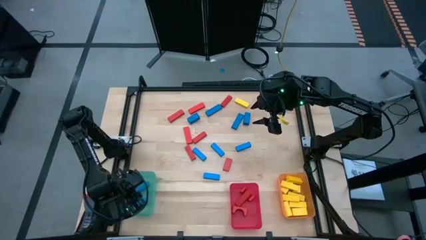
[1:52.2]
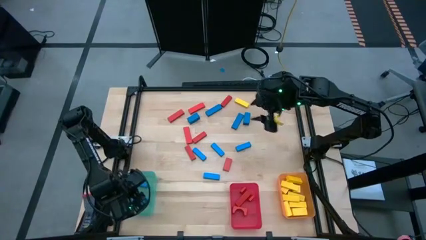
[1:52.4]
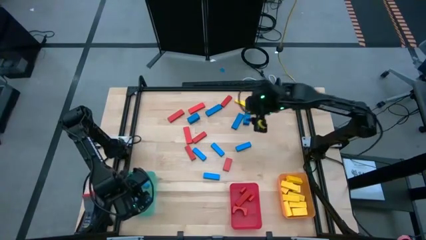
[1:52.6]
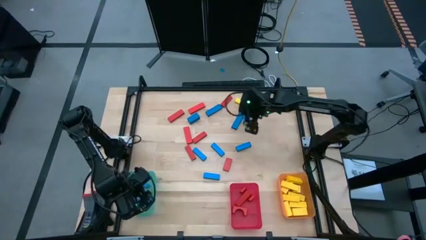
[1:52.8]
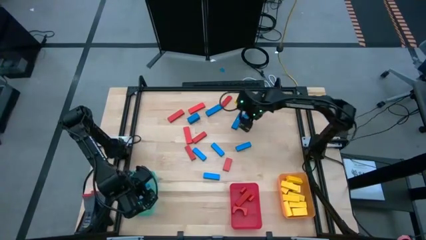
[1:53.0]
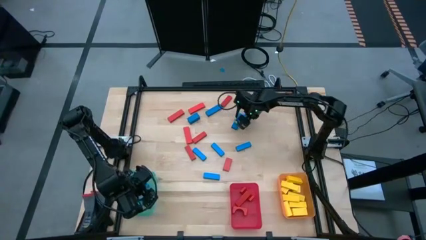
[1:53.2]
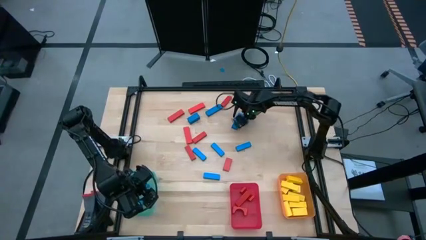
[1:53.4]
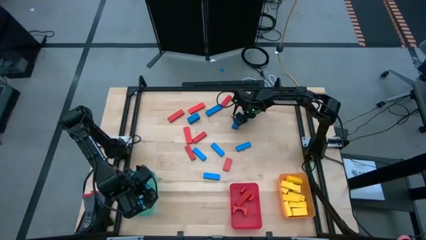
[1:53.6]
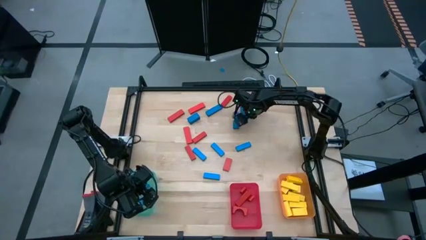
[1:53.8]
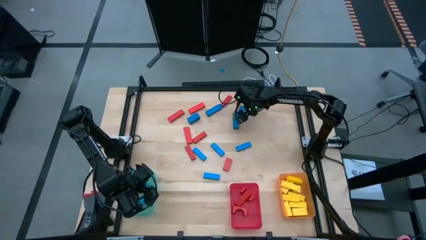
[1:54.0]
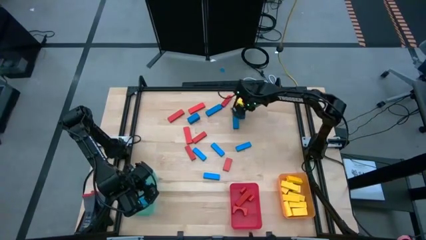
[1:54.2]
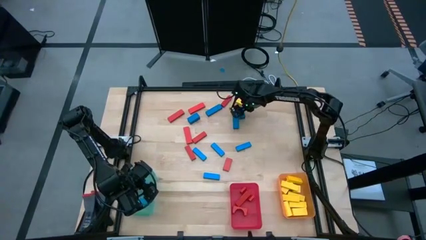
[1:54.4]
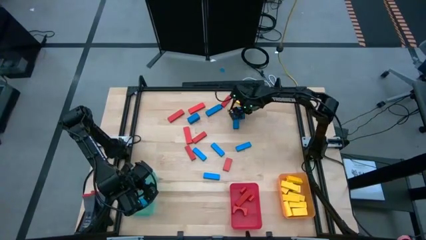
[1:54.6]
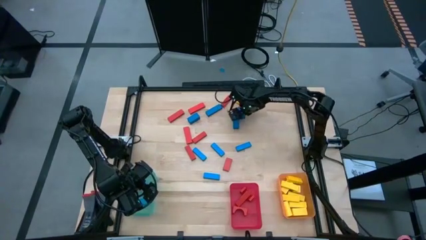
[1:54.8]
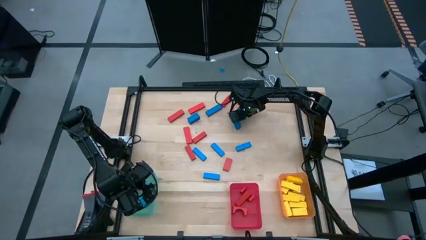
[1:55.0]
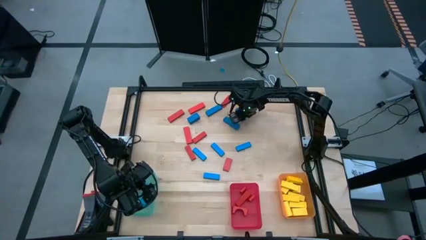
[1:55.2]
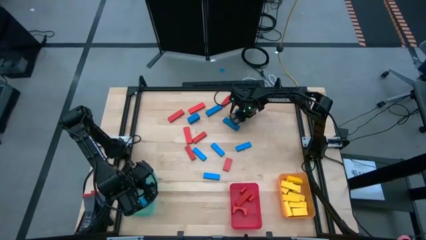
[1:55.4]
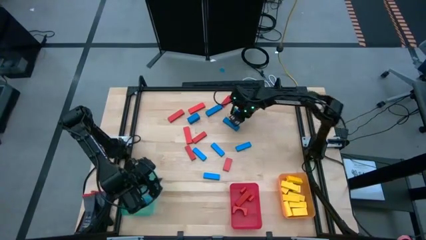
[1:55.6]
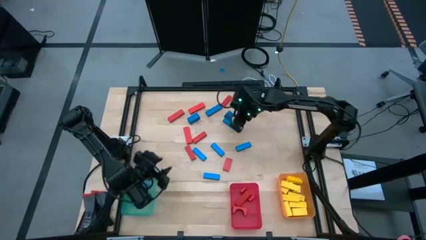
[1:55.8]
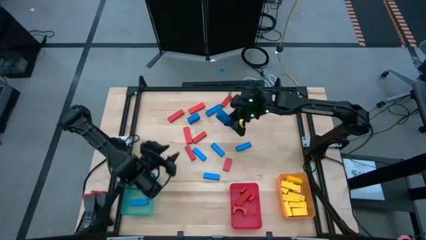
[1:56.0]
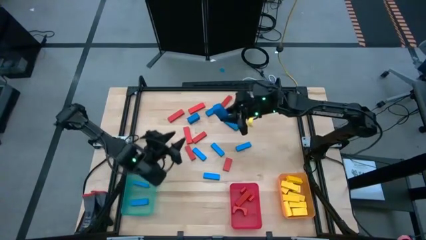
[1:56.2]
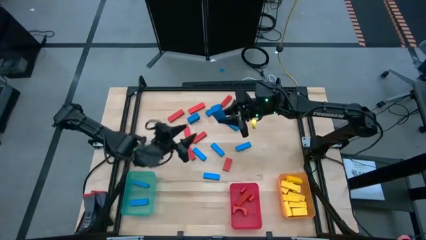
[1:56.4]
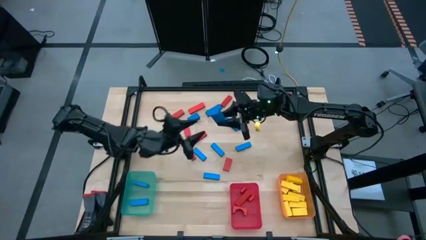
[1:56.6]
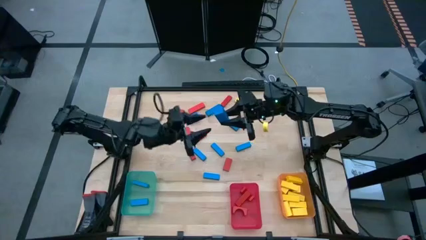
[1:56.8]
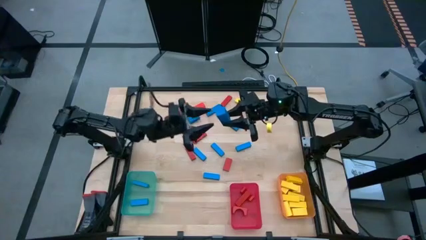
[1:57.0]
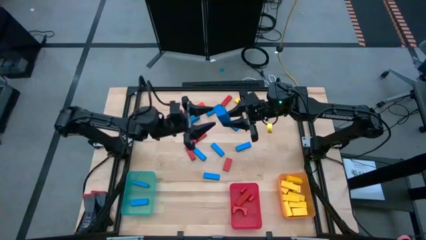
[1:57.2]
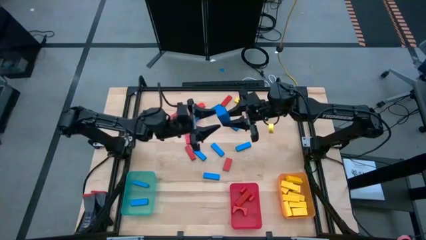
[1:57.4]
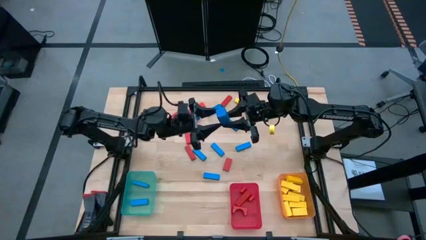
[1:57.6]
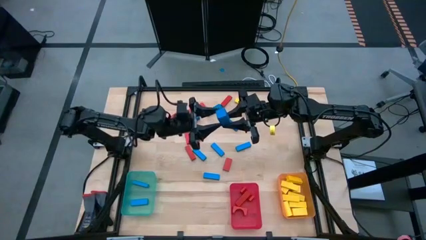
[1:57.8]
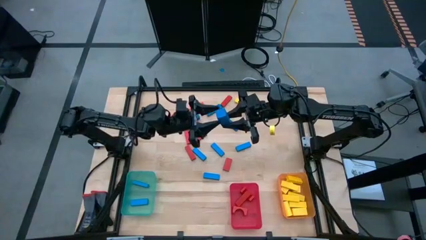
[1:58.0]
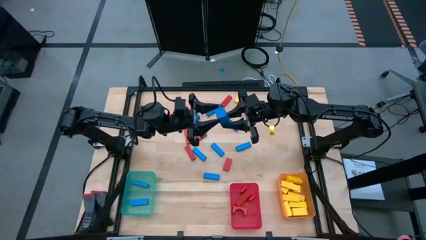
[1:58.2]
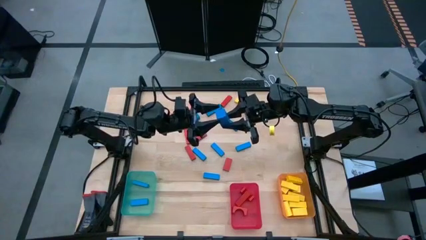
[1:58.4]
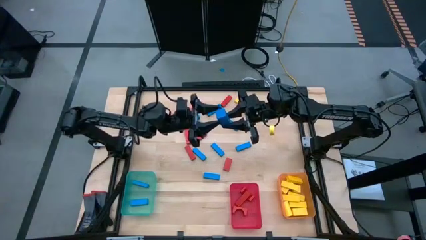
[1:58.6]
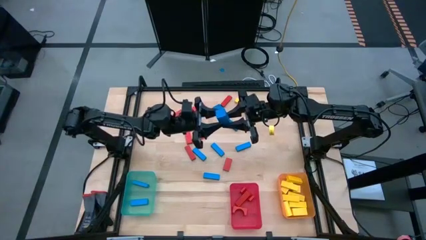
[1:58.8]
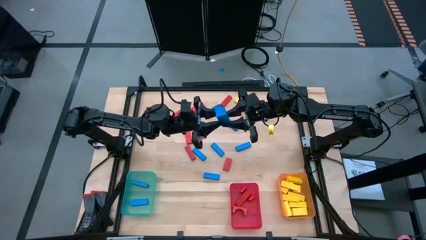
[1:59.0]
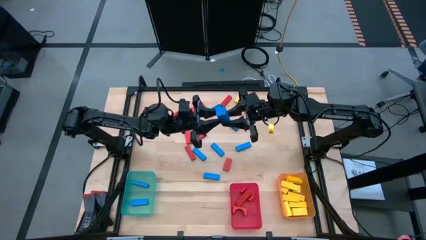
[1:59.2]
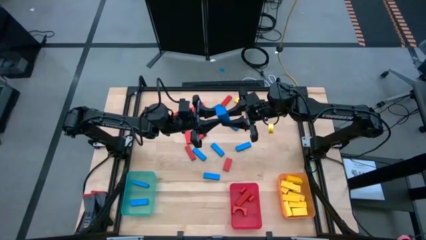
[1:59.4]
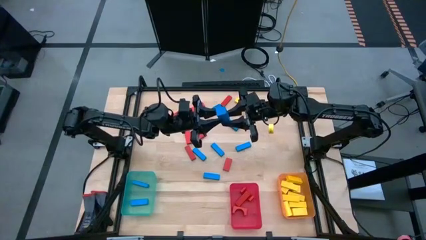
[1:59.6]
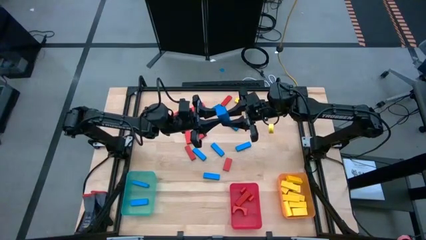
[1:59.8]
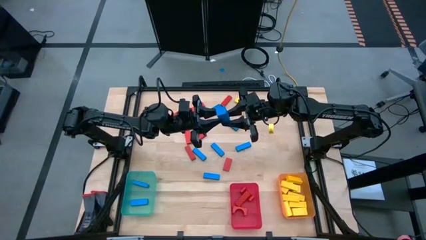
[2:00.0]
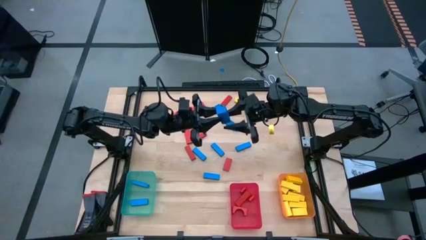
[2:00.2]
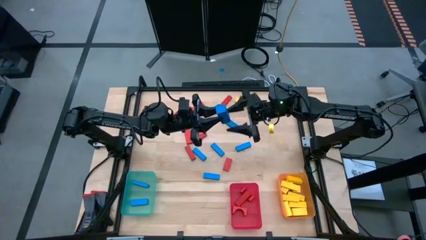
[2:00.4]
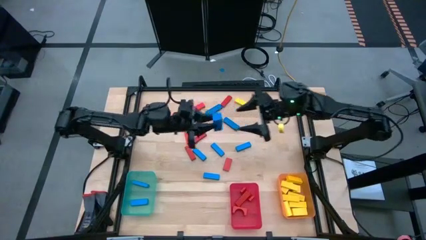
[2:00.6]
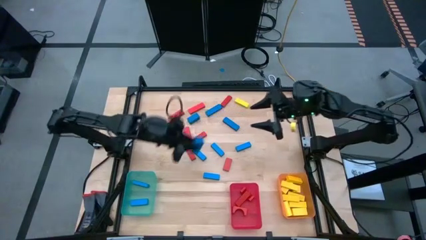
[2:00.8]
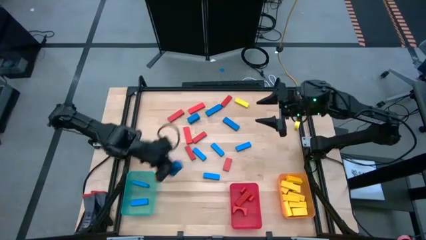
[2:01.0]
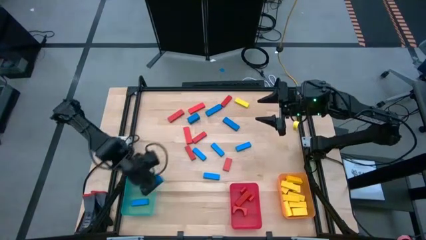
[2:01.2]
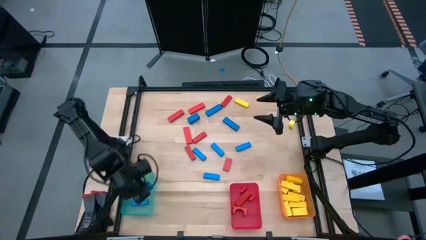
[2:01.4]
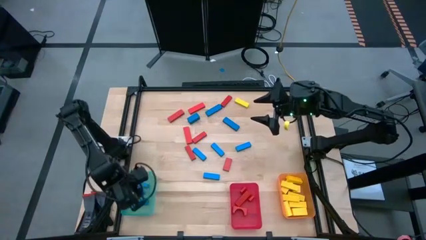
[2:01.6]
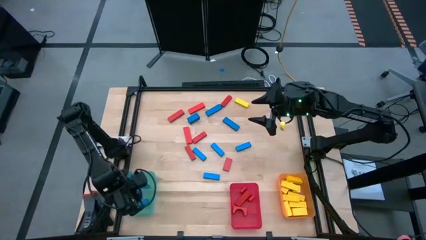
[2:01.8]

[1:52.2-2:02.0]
Task: Sort blocks
Put the blue block into the blue bin

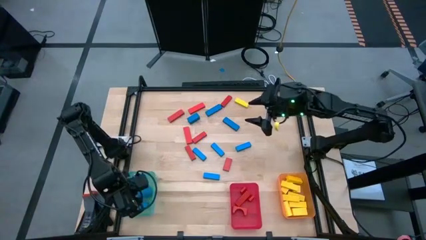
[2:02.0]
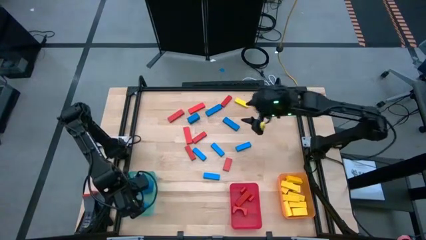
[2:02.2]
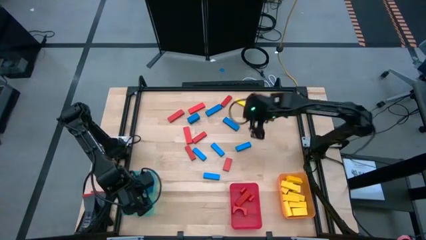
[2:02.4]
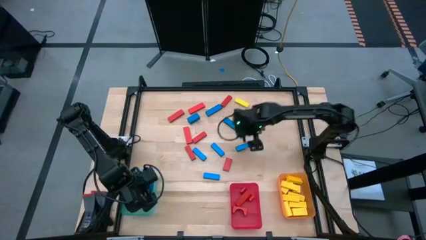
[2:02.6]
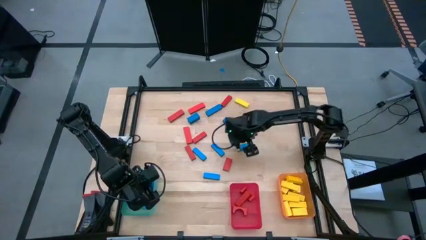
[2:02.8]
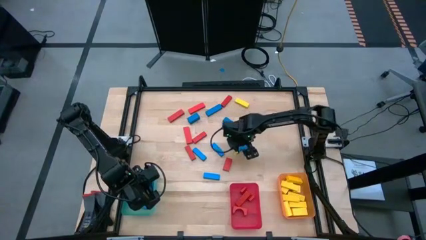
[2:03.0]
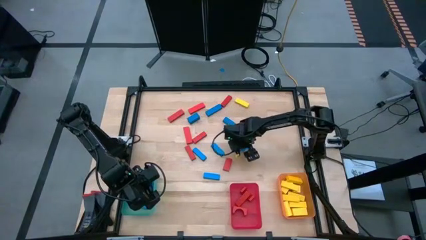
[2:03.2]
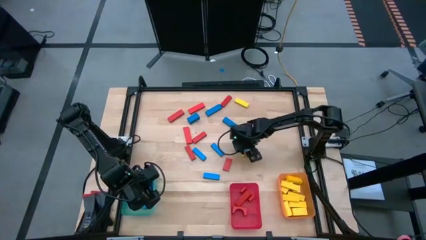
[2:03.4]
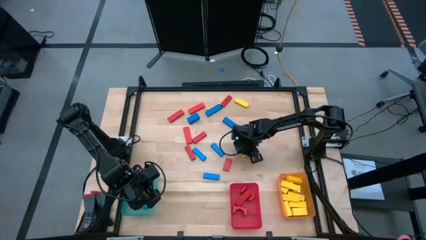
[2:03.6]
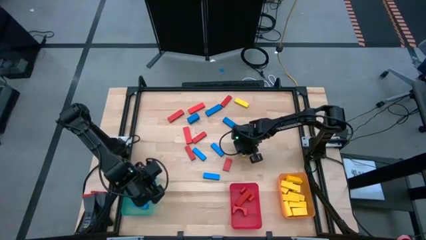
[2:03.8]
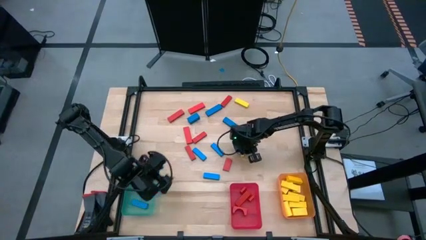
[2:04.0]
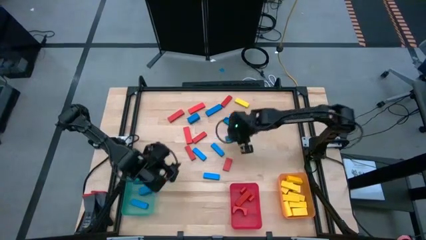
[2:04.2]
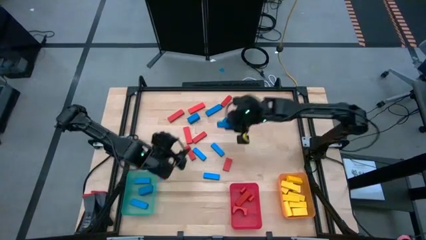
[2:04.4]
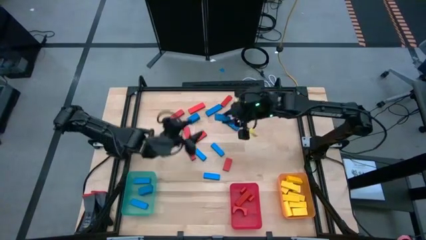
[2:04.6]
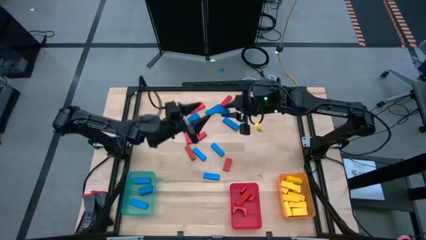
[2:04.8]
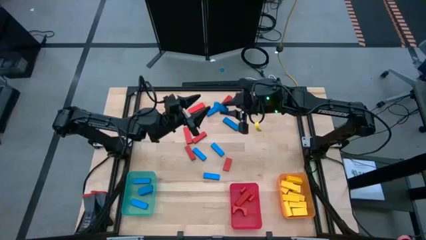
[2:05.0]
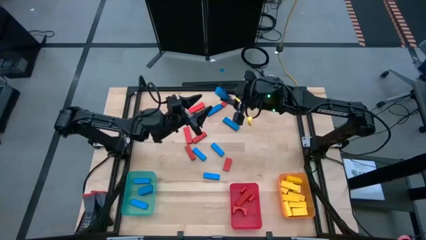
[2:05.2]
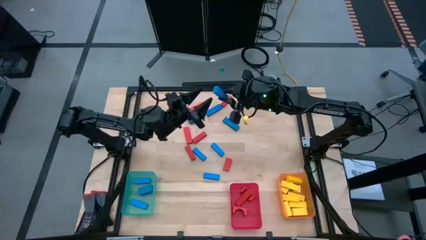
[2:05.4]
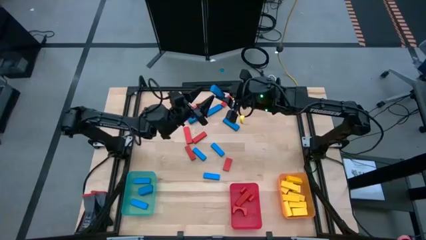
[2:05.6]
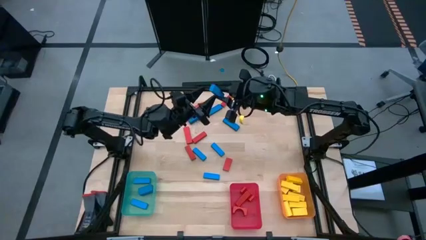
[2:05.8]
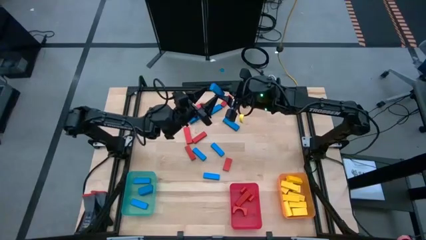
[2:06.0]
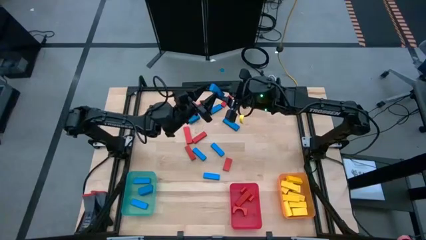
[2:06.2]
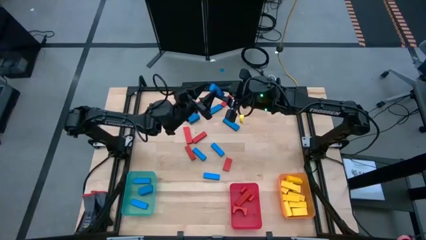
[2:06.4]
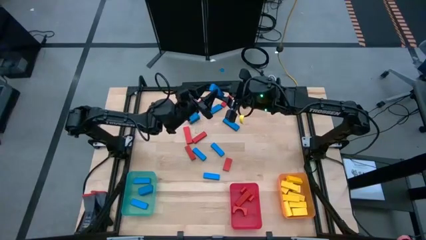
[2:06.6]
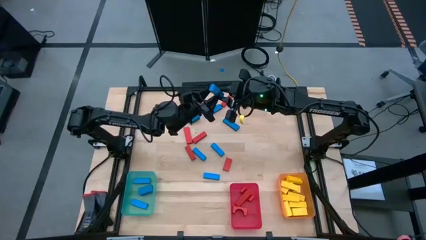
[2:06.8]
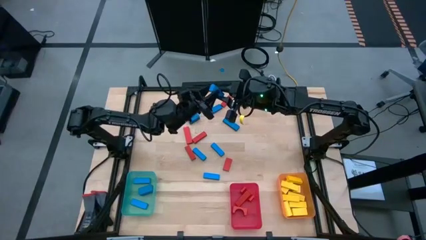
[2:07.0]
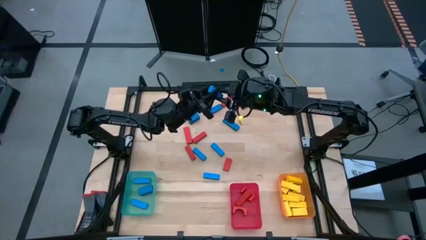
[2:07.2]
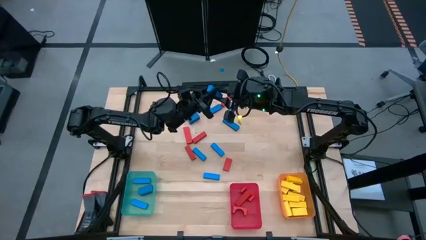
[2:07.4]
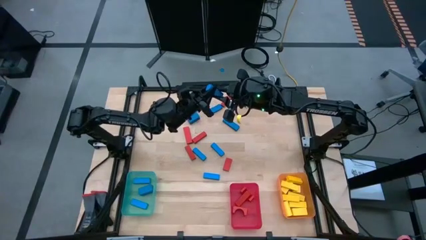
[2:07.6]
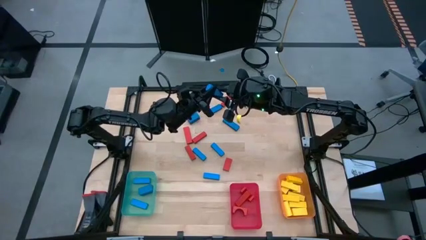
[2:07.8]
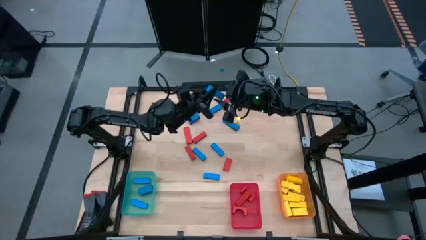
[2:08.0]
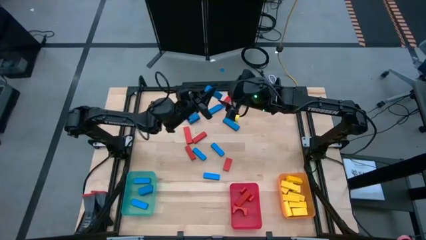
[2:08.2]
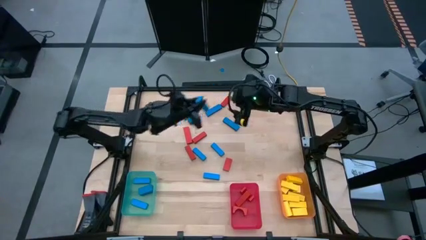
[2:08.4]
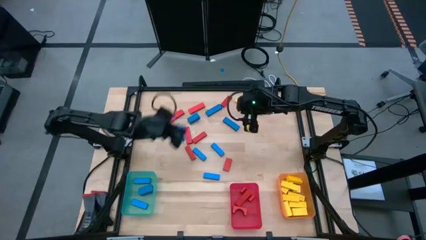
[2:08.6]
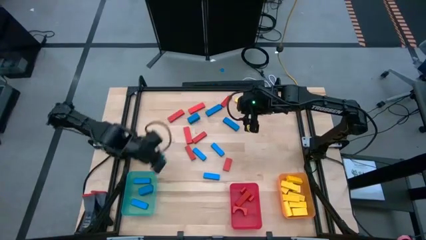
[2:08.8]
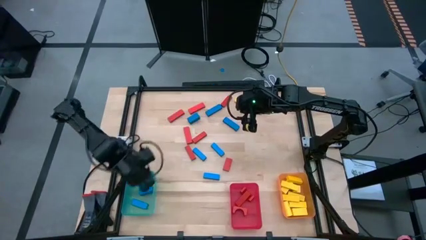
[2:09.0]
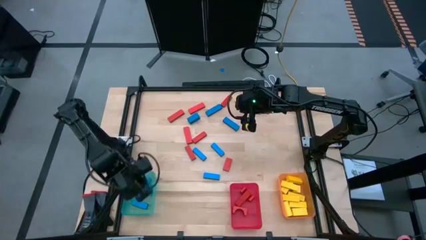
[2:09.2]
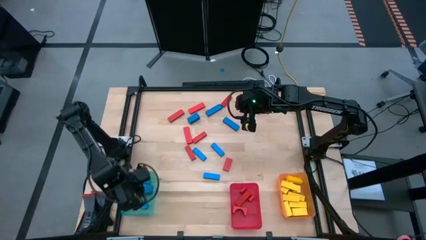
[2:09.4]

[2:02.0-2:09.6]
Put the blue block into the blue bin
